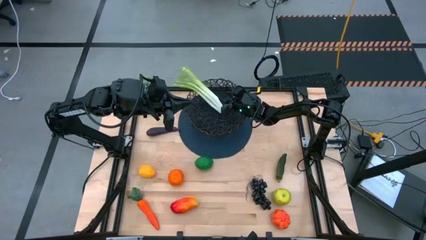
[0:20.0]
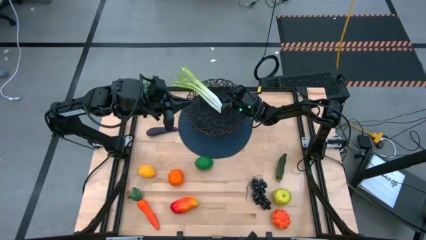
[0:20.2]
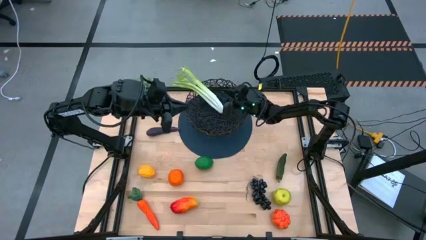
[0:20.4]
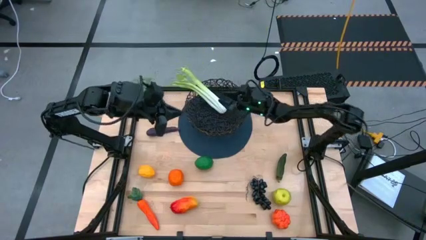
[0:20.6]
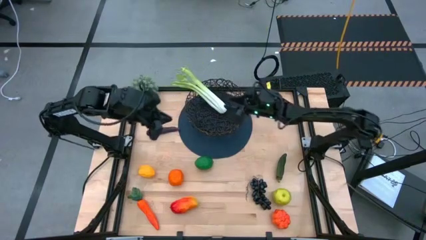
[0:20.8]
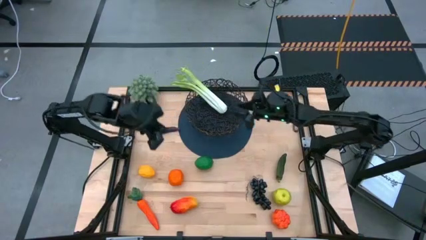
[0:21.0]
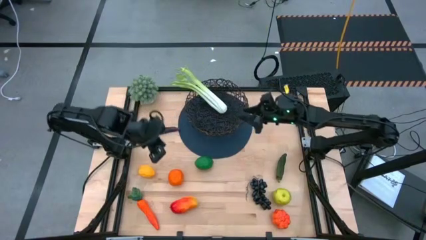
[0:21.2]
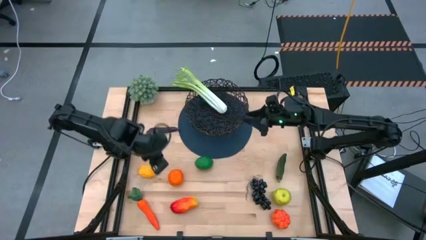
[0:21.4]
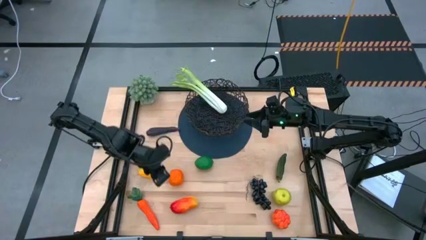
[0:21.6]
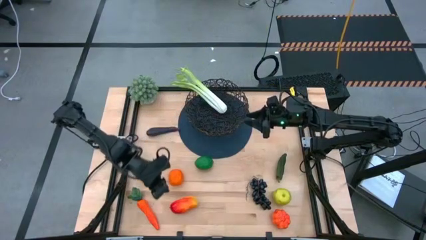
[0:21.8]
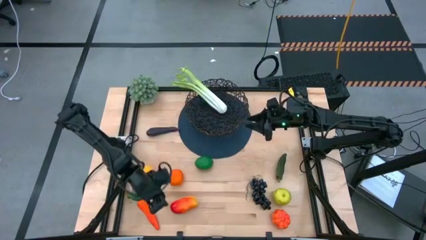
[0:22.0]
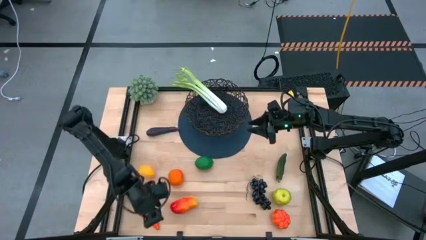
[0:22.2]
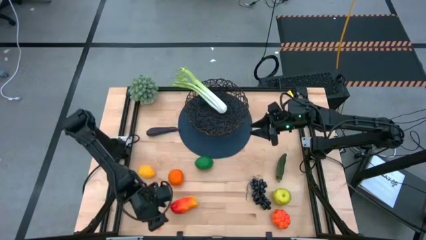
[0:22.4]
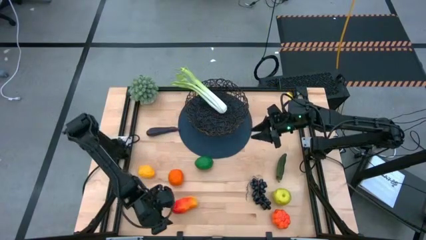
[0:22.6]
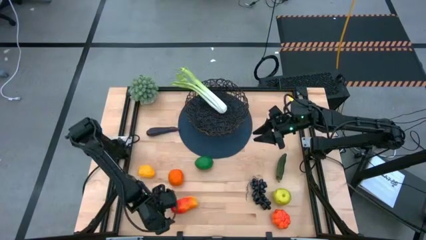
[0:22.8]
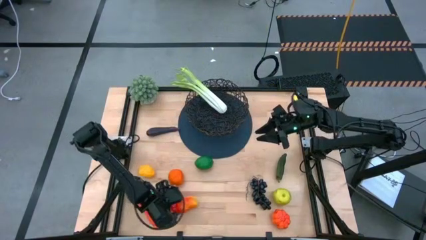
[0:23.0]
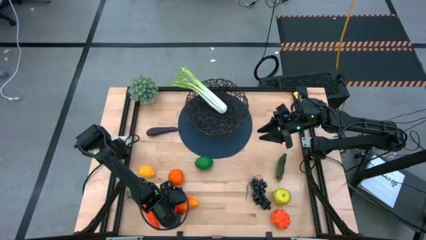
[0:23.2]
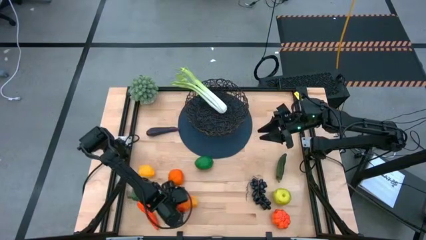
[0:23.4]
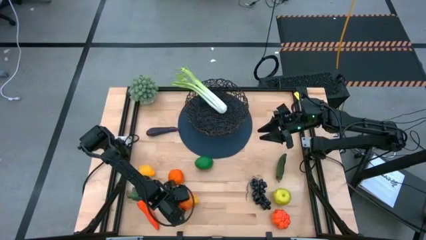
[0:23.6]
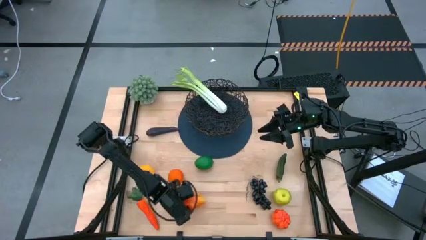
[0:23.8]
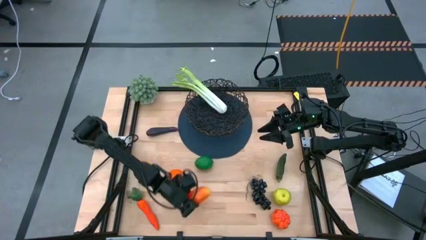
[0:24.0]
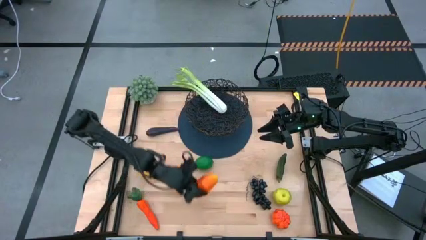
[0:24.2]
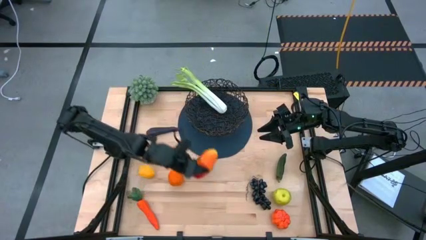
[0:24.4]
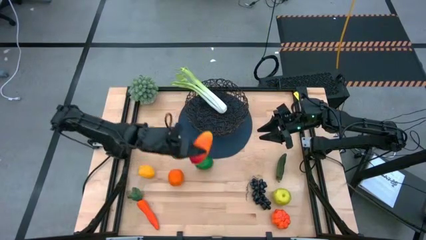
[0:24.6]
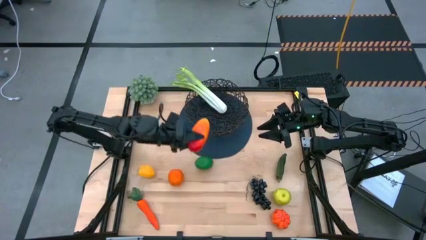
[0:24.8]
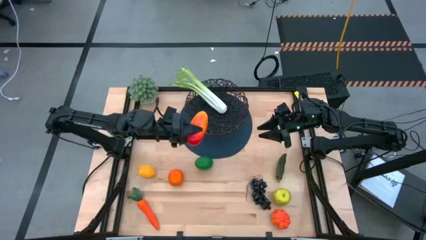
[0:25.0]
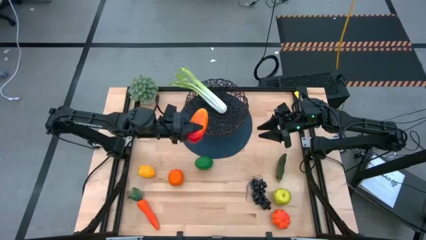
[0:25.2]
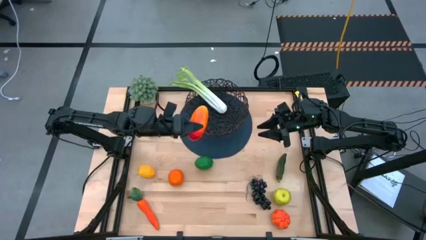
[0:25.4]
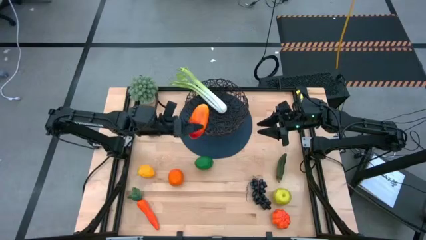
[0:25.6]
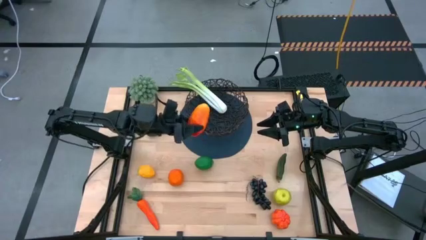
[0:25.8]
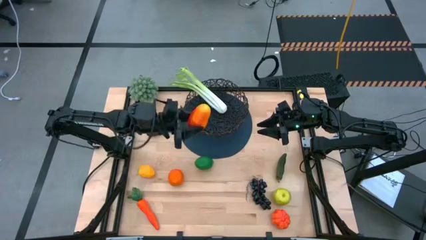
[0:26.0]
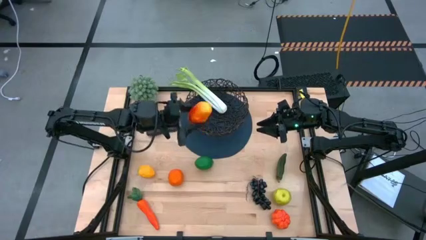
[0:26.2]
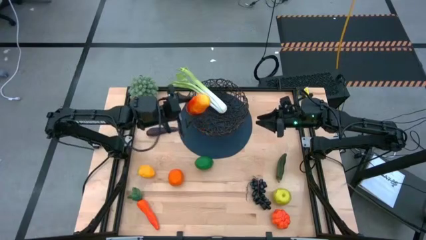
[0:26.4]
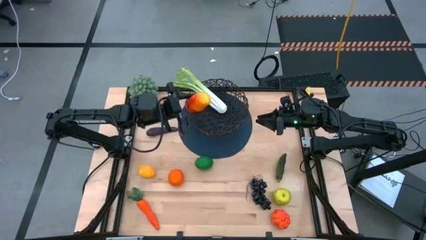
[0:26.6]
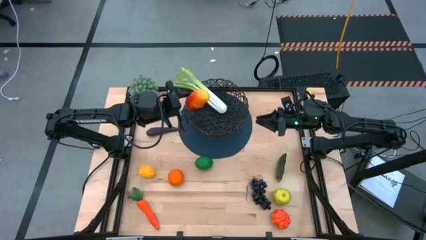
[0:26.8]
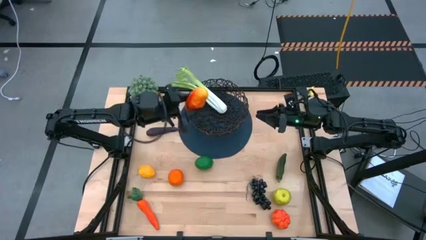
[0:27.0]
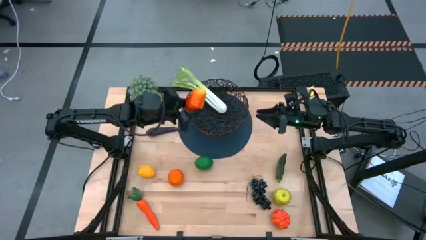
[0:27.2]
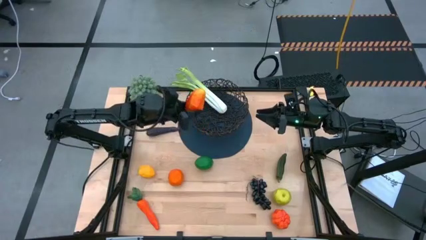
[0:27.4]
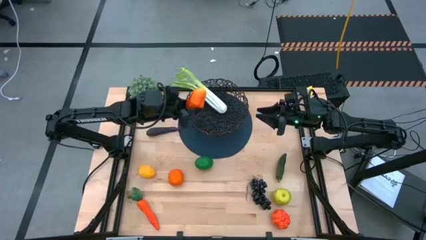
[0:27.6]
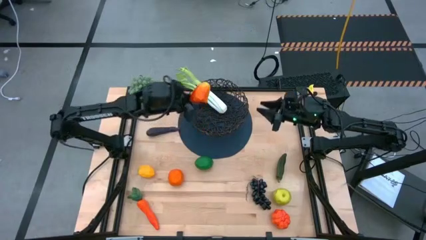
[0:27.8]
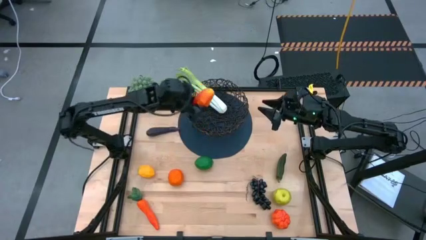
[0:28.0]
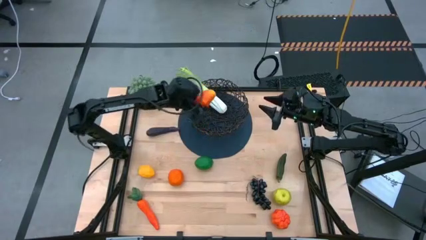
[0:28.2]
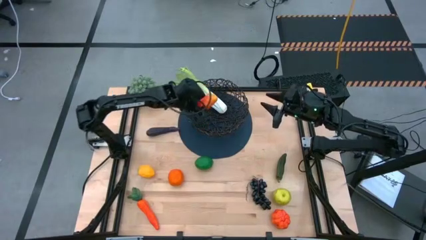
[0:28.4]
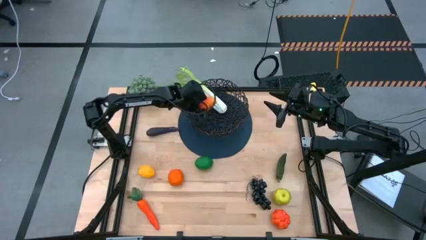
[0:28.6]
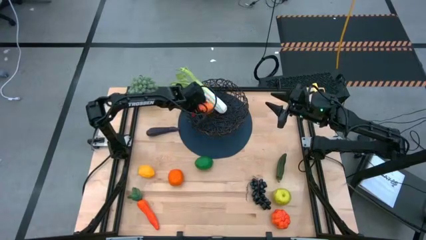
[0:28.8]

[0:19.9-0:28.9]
Task: Build produce basket
Put the orange mango into the wire basket

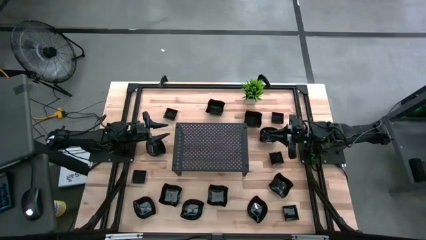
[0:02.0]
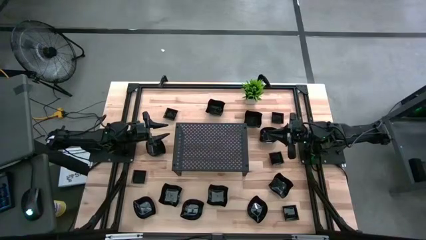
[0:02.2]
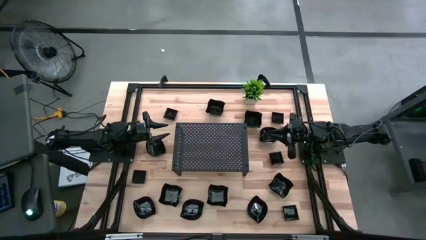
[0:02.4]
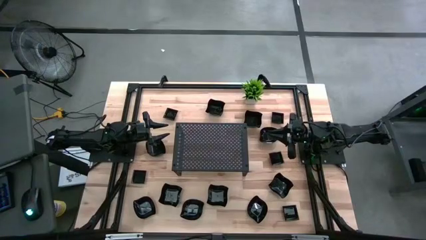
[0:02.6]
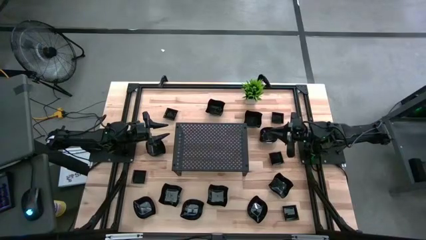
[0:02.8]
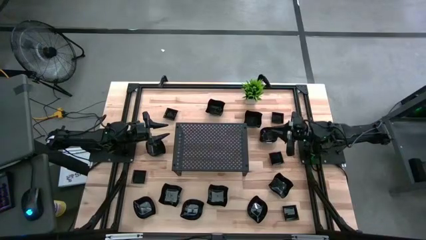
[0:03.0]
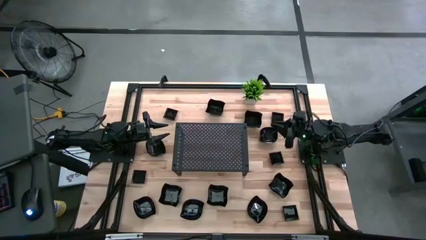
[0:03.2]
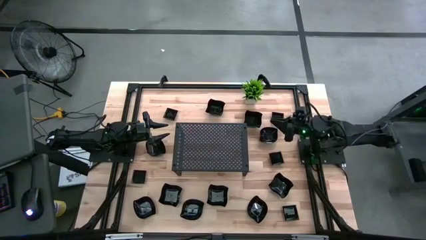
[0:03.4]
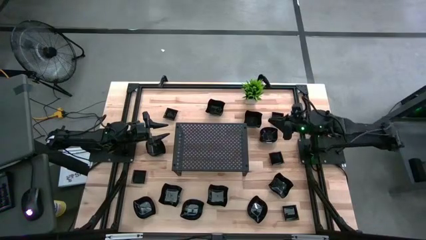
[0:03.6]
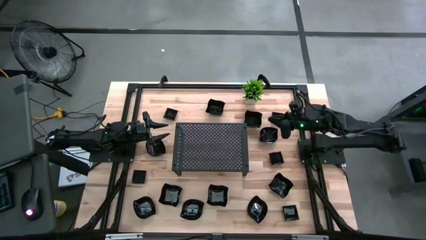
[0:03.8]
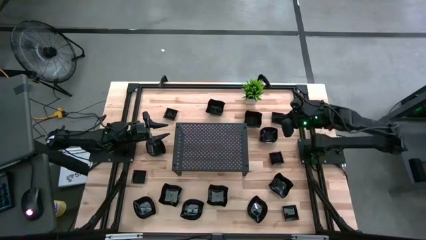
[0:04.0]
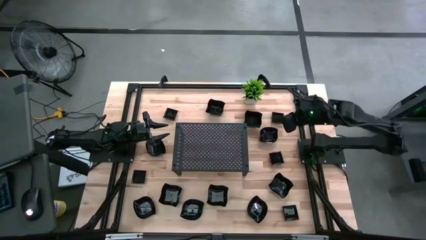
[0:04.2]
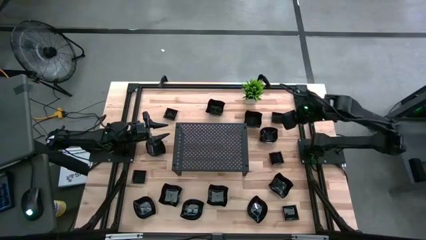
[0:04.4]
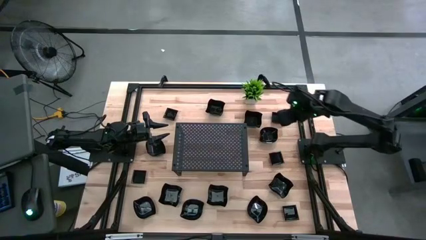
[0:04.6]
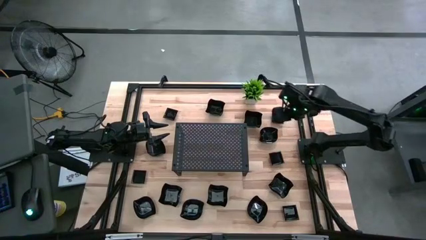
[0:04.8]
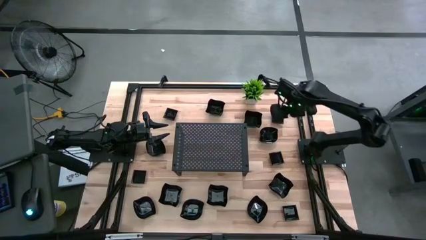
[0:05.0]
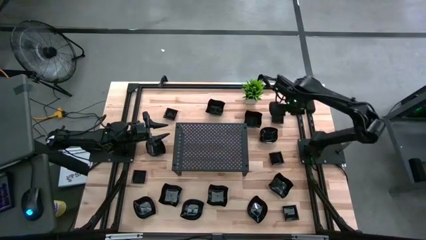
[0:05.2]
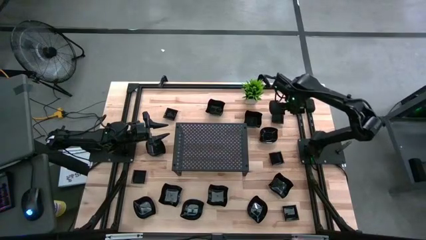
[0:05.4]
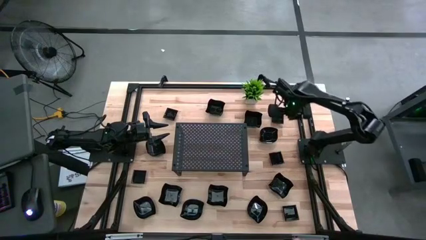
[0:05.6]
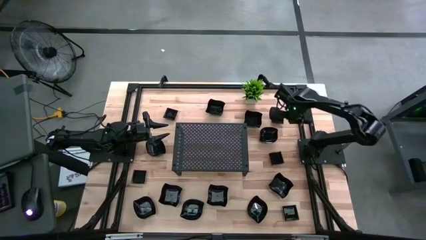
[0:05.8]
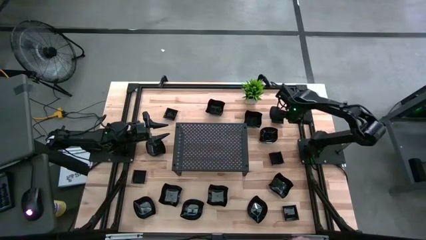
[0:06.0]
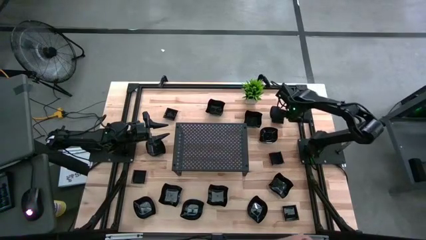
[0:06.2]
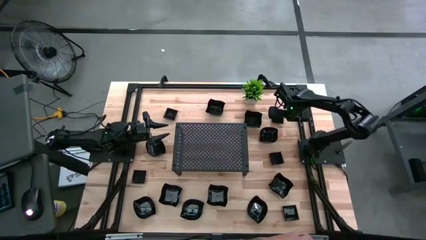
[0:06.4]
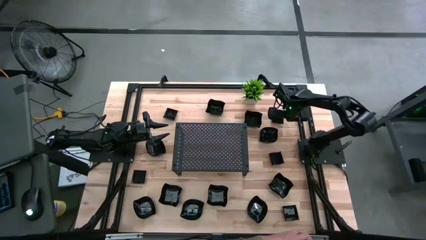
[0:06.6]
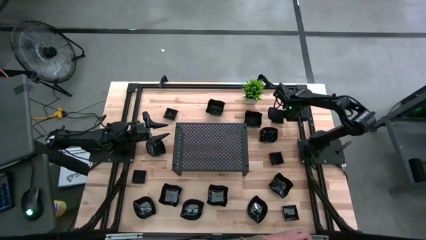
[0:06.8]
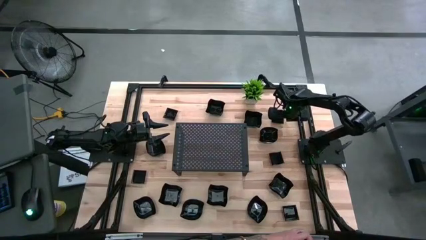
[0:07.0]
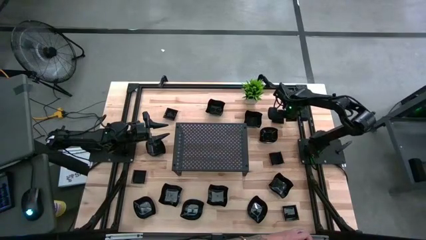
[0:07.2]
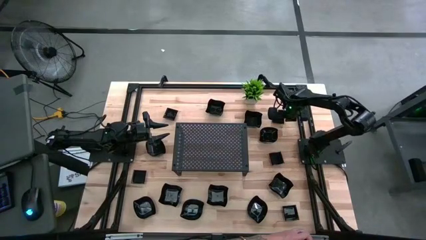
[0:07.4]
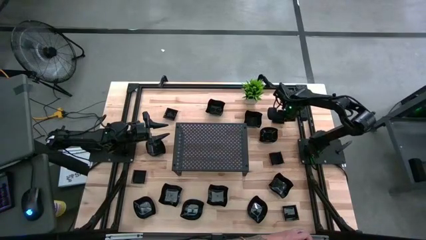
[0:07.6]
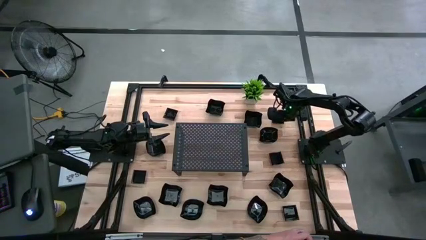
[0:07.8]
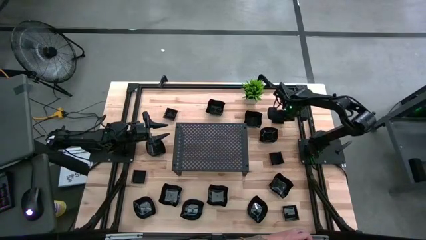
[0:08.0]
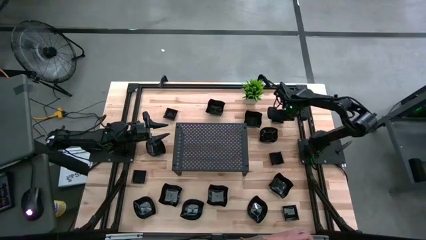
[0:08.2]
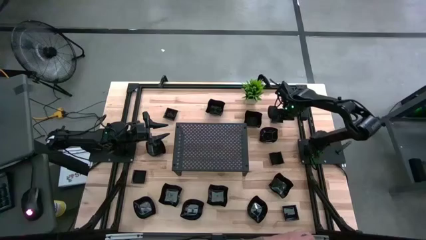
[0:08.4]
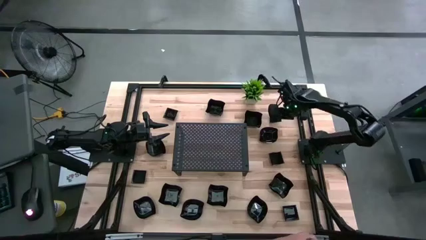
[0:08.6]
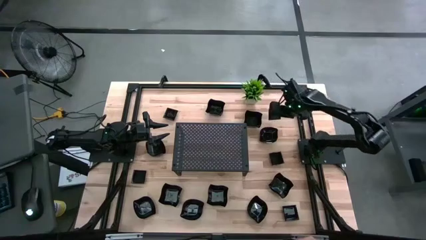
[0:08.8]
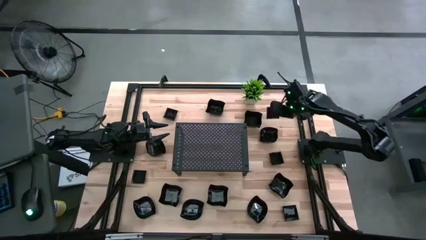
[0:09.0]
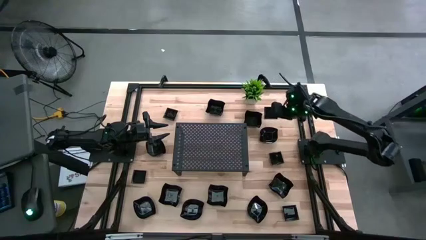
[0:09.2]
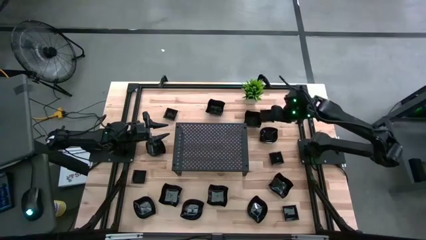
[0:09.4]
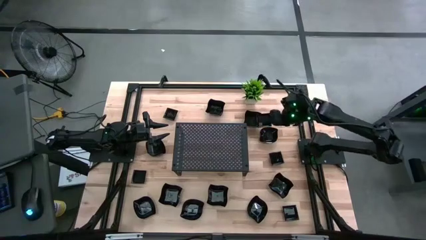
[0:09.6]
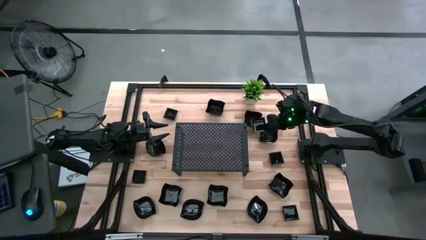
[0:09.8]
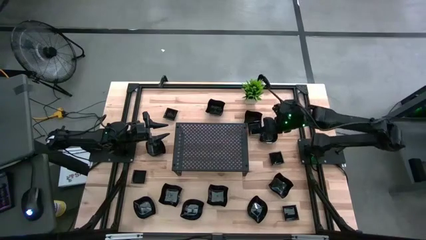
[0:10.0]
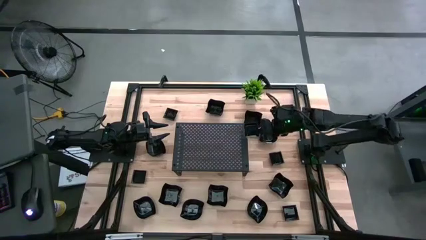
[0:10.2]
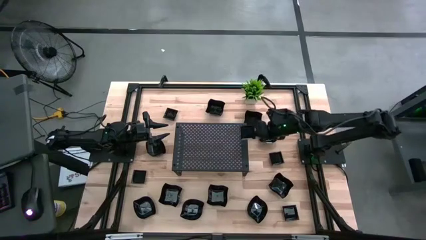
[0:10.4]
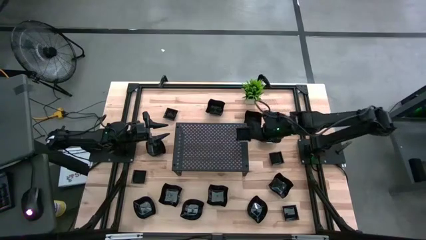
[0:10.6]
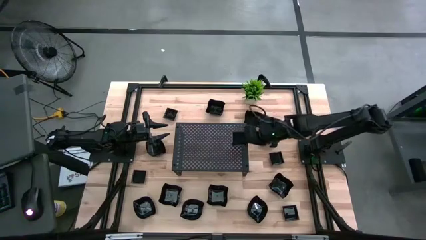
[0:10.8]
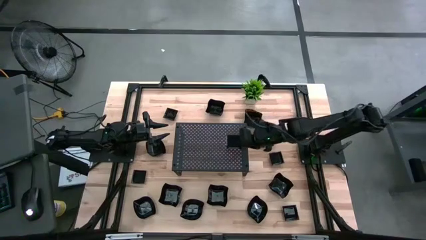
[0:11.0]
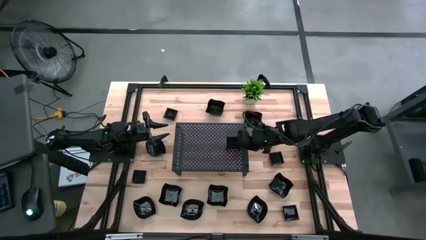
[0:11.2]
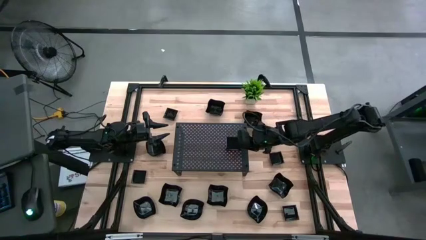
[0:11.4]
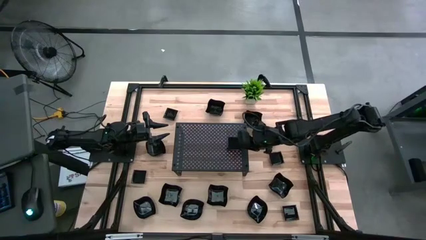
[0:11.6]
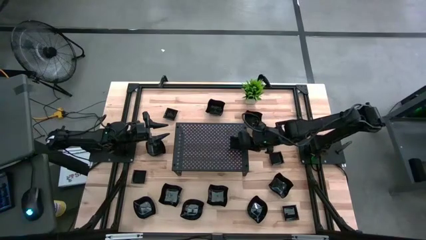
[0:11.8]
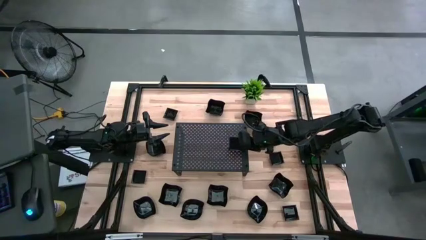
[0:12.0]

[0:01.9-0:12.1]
Task: Pick & Place Mini shaped plates
Put the square plate on the shelf
